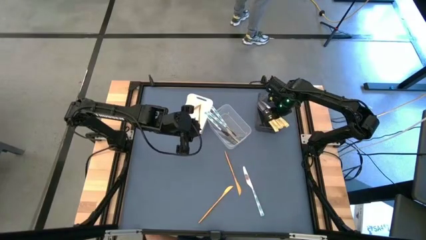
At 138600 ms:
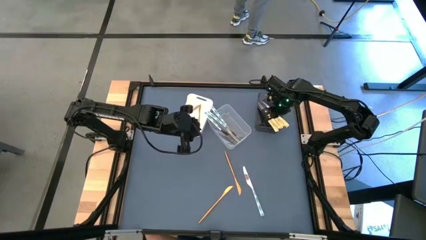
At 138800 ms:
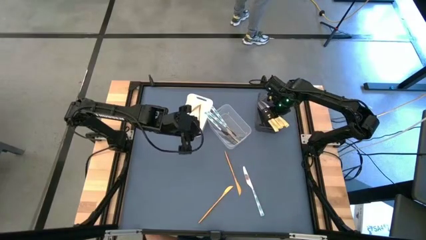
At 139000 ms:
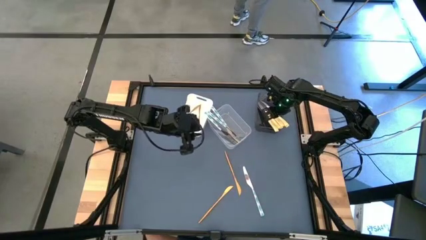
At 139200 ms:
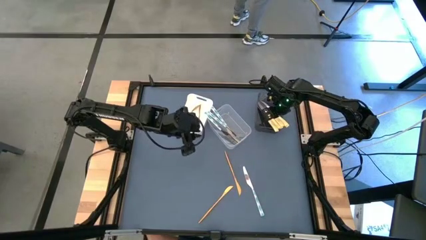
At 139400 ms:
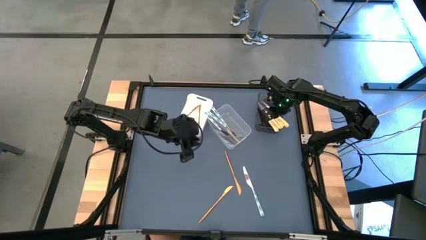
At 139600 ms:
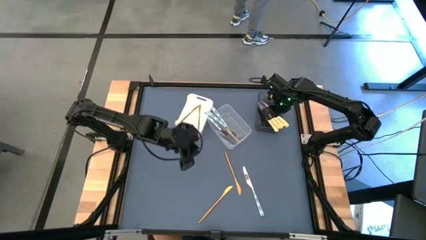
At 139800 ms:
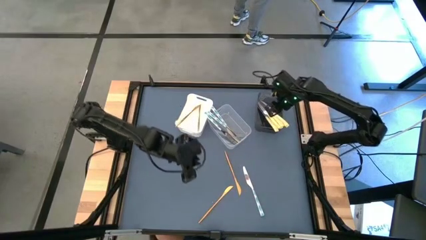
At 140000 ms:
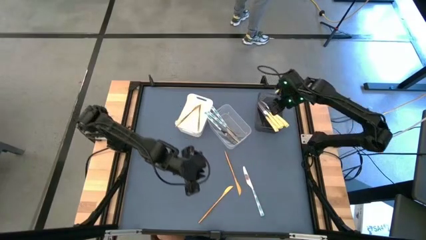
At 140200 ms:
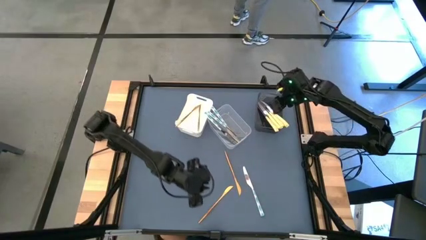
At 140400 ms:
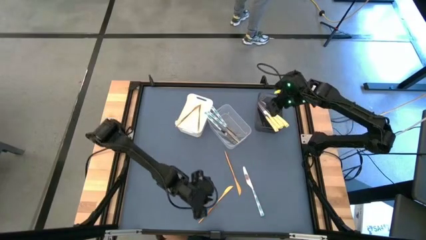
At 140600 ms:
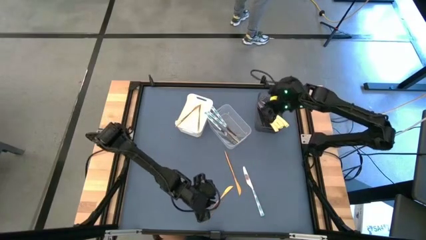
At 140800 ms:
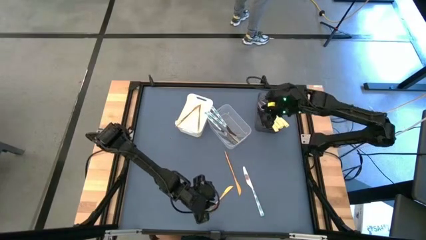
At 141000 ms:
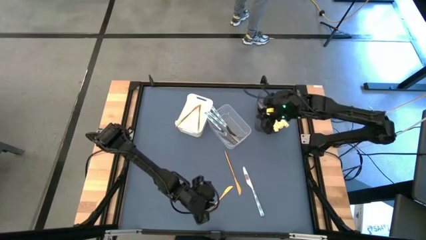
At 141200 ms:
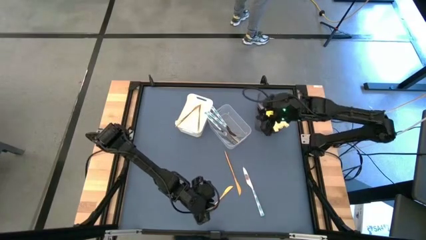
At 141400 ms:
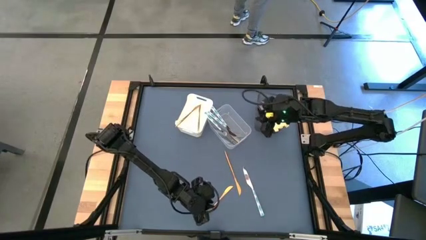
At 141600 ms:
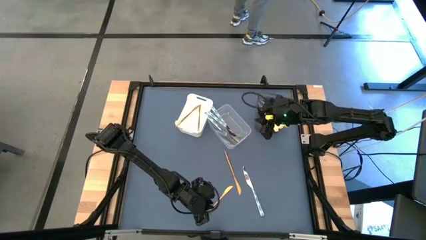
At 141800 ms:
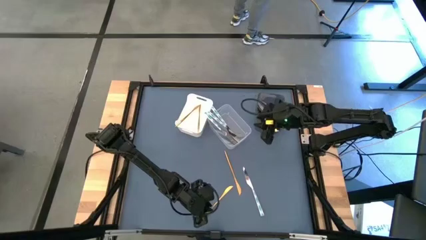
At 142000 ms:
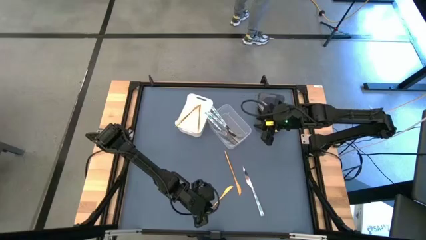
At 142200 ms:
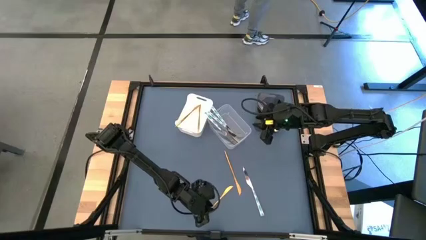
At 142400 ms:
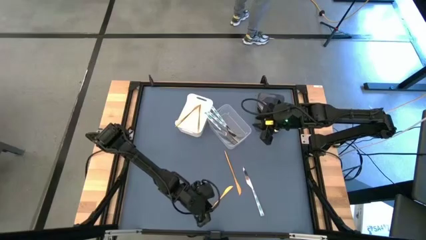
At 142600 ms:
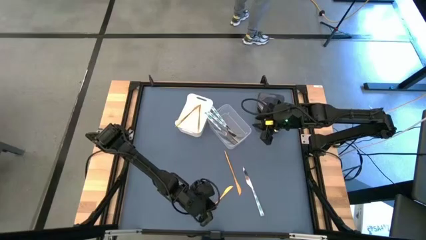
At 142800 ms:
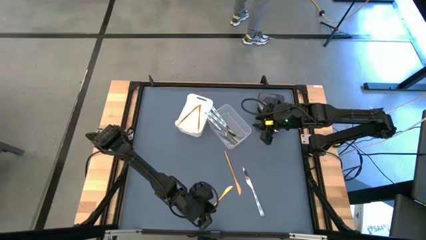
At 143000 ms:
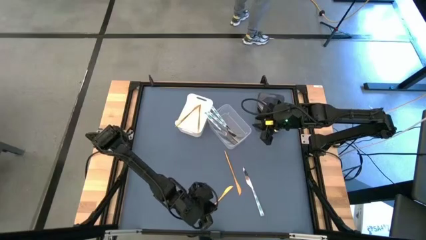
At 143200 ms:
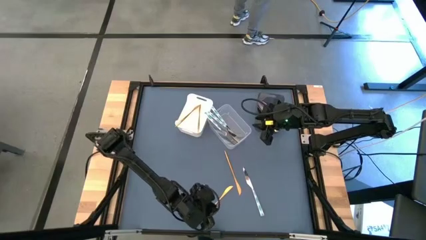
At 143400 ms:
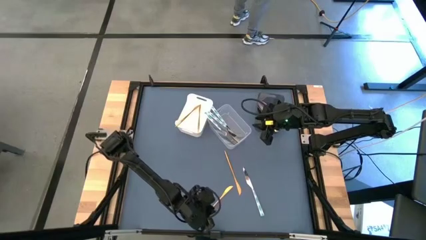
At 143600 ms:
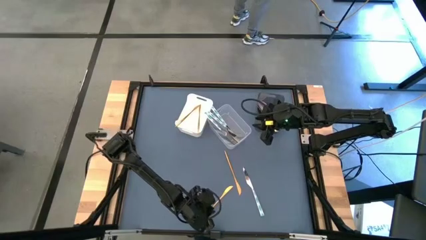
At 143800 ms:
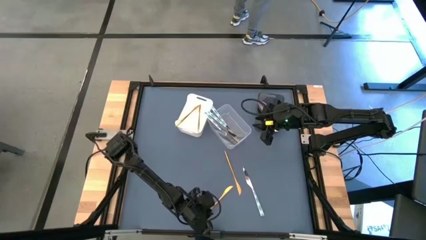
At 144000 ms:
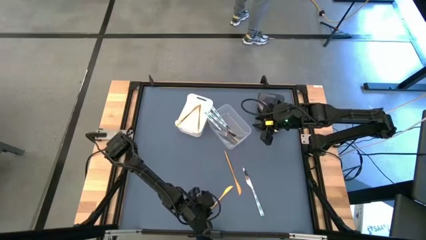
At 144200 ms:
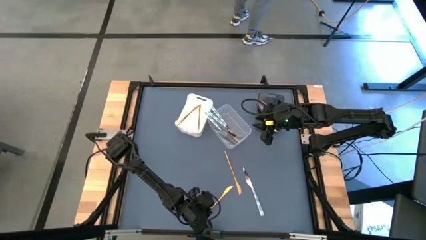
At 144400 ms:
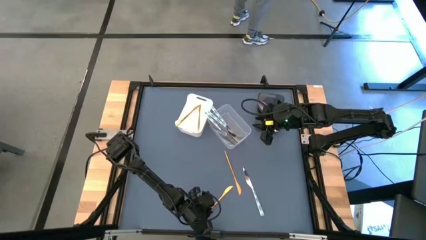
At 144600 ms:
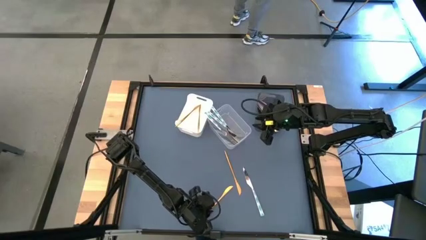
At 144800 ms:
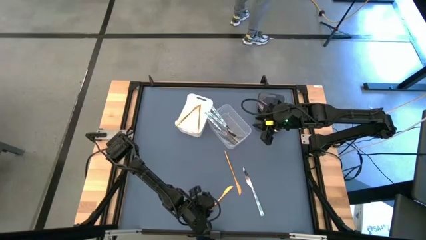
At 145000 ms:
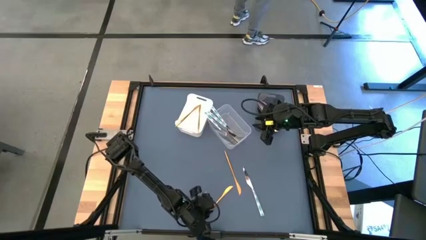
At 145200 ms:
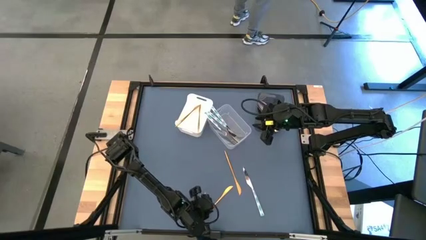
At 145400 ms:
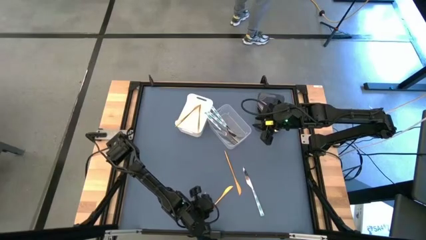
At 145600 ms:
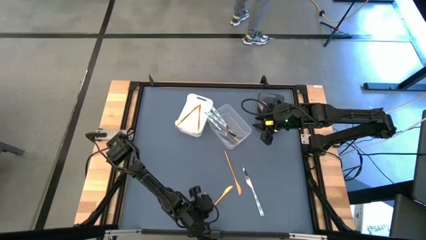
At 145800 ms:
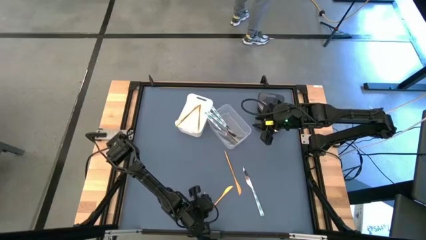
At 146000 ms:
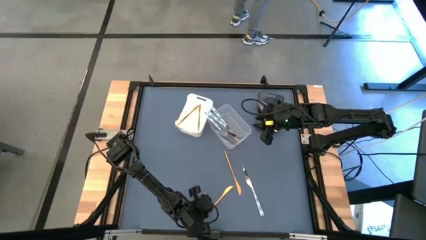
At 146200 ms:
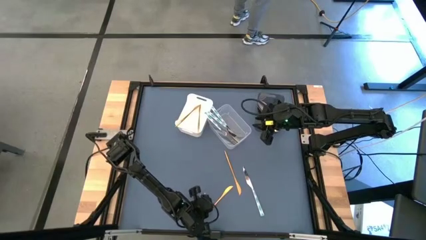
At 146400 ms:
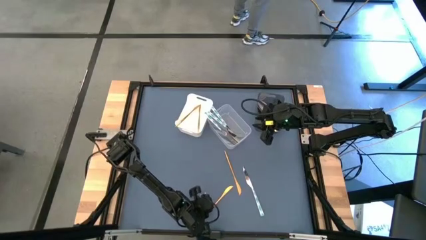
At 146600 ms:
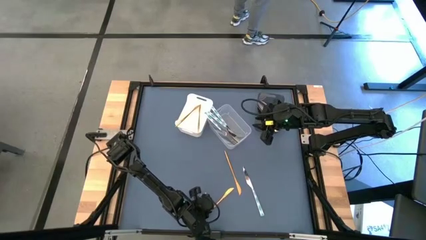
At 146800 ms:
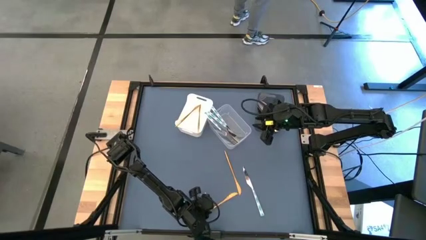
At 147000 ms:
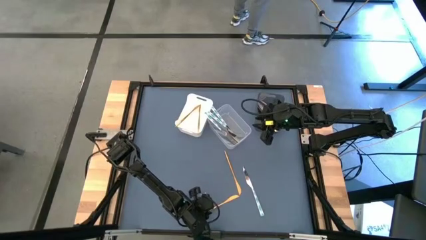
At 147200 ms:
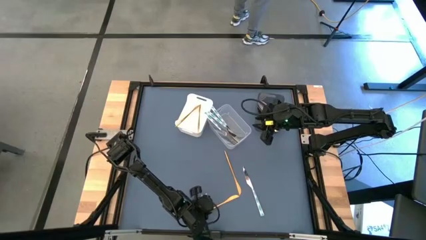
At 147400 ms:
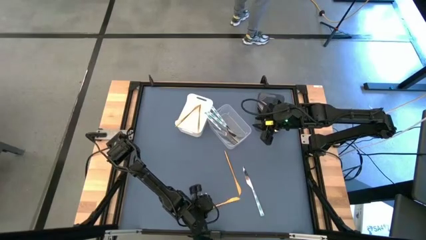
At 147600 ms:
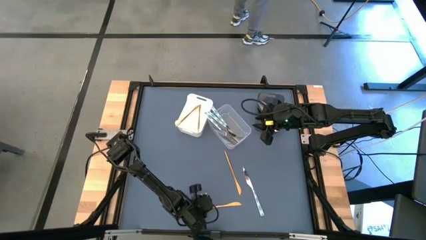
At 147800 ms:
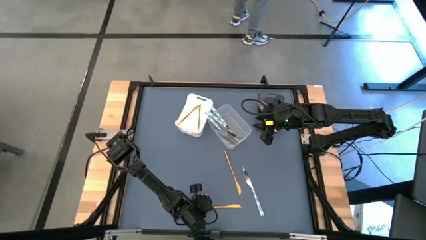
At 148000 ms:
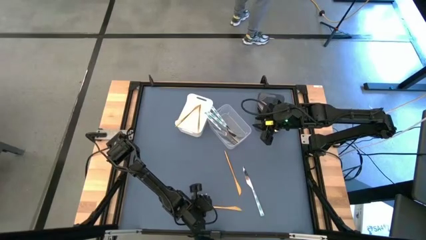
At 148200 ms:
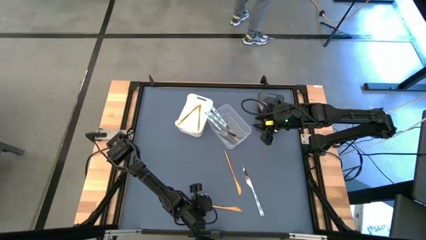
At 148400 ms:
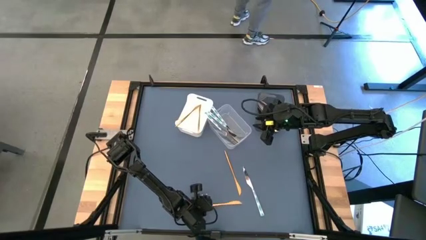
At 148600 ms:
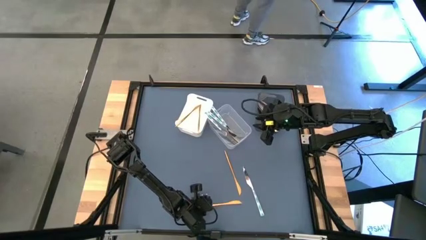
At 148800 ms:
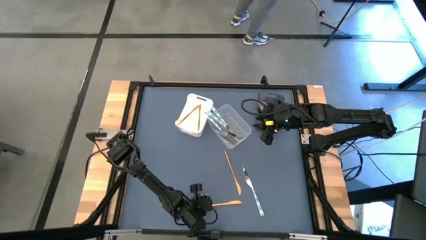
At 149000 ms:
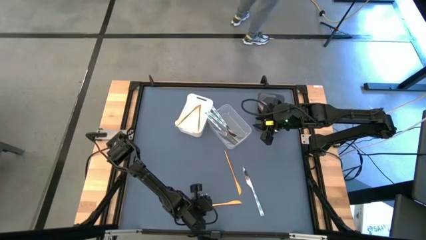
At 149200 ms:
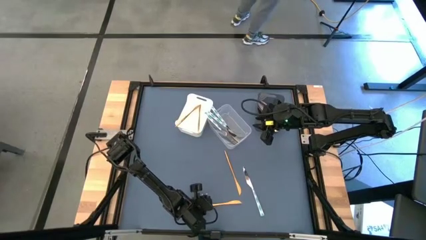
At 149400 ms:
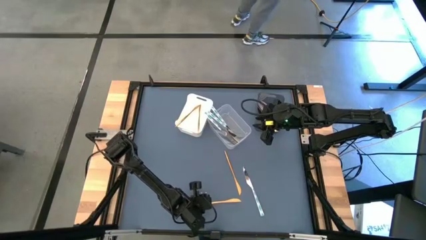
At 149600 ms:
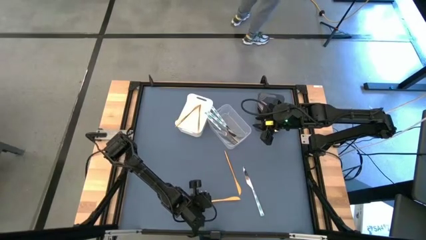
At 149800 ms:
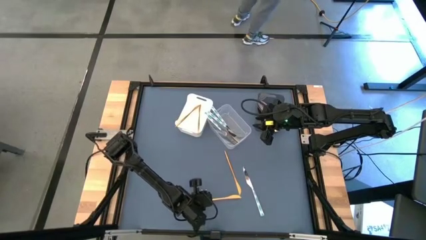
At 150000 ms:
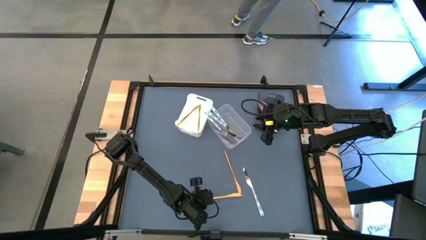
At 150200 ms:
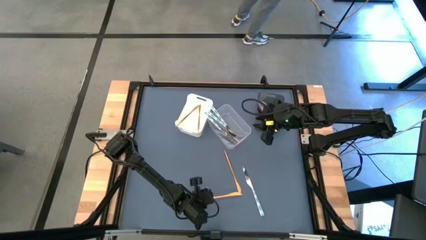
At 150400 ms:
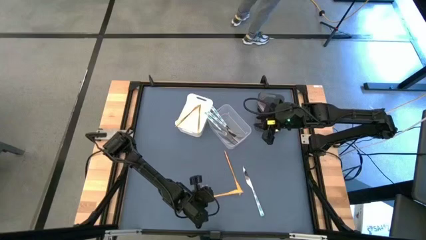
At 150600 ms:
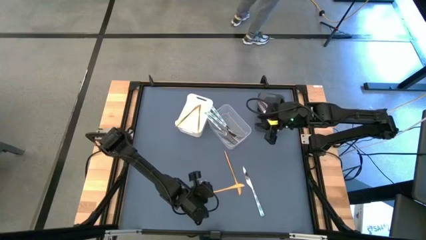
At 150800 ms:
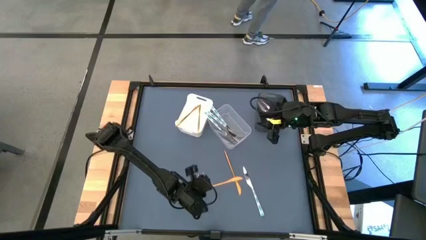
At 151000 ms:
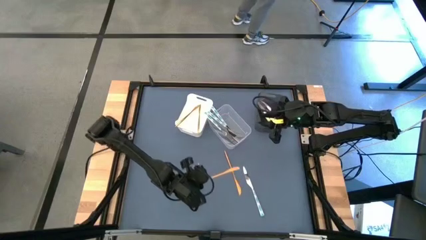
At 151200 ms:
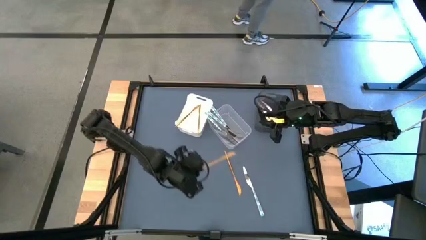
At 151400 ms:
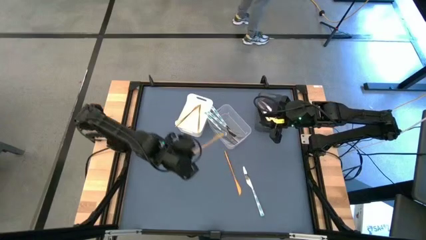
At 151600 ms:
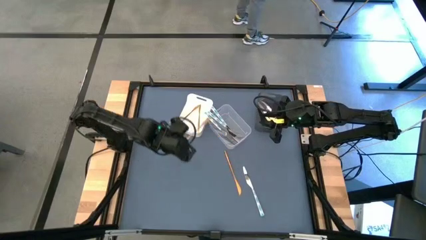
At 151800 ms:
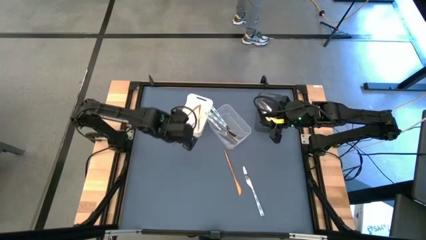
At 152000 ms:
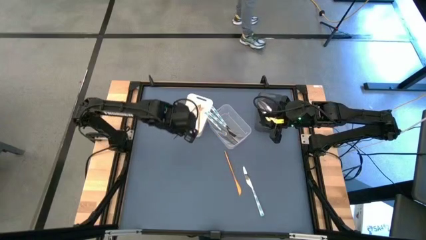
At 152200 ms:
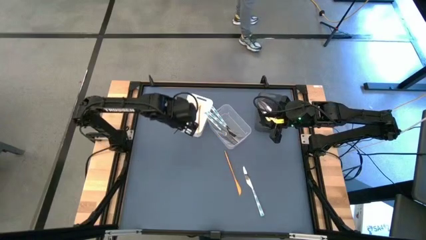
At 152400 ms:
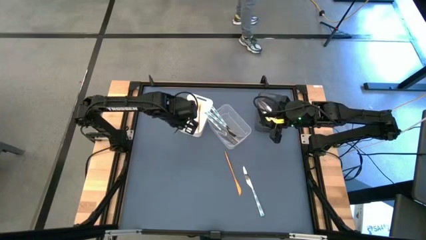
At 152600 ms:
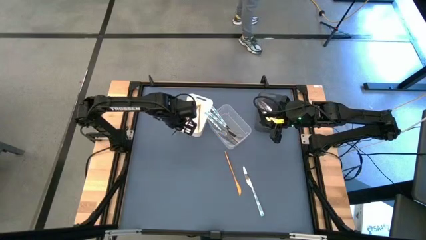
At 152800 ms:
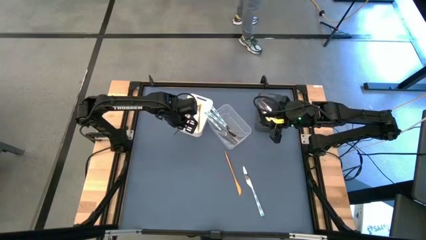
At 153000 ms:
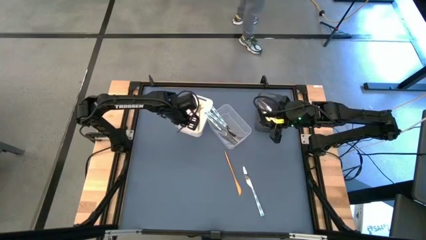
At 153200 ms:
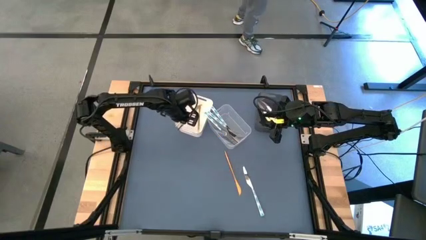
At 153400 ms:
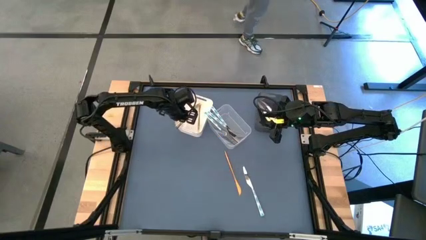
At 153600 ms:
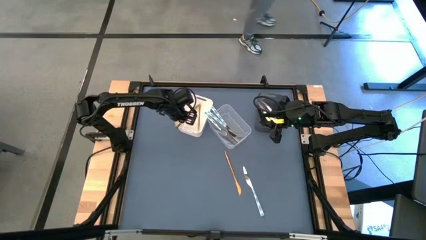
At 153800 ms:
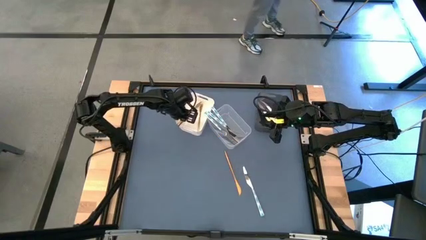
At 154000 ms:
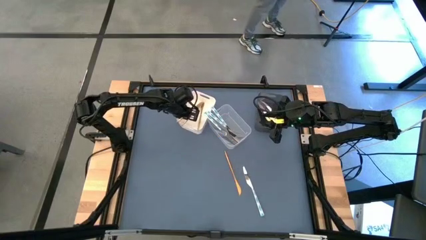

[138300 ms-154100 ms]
Task: Sort silverware by color (type)
Put the gold knife into the white bin
